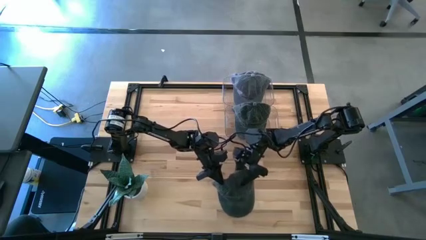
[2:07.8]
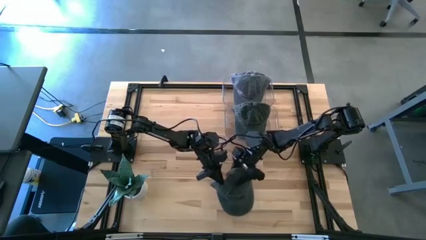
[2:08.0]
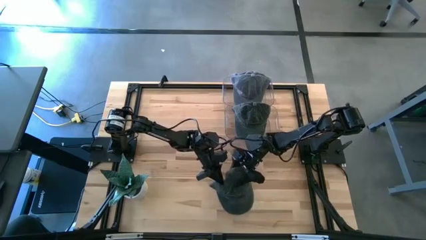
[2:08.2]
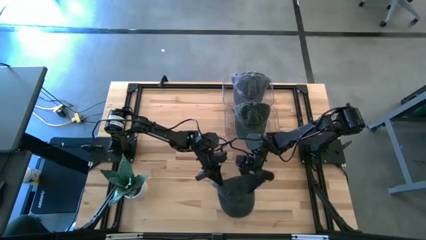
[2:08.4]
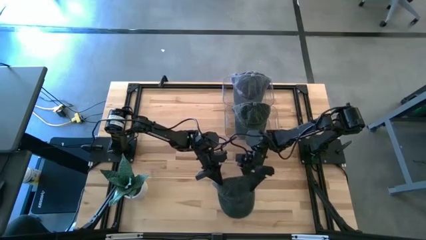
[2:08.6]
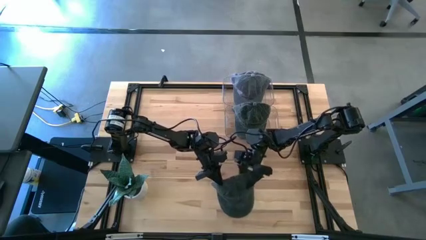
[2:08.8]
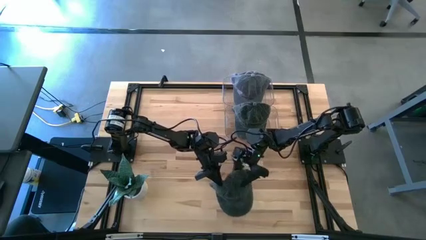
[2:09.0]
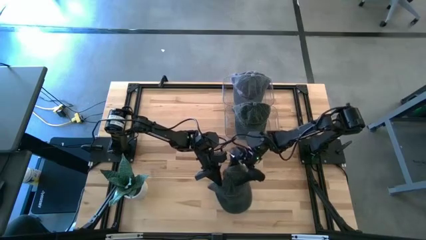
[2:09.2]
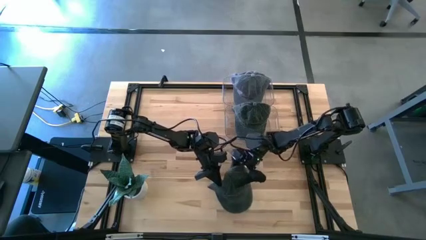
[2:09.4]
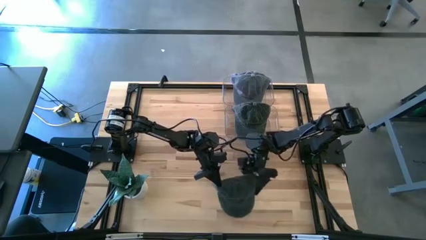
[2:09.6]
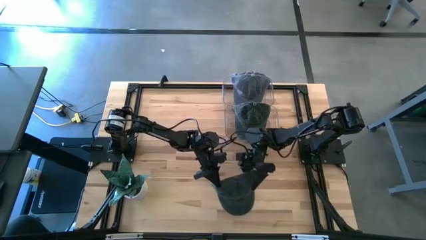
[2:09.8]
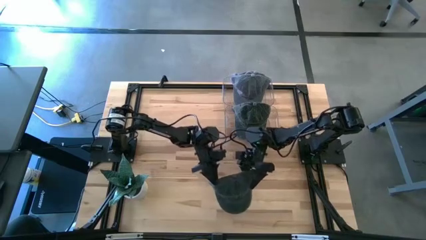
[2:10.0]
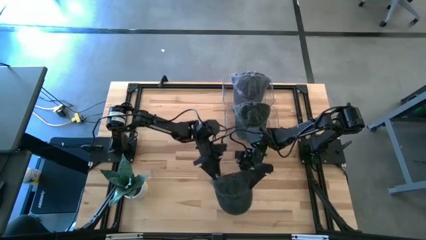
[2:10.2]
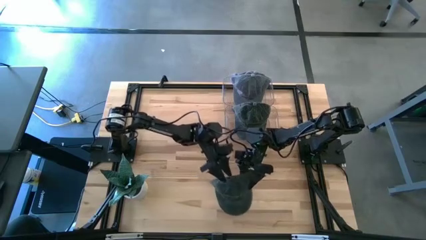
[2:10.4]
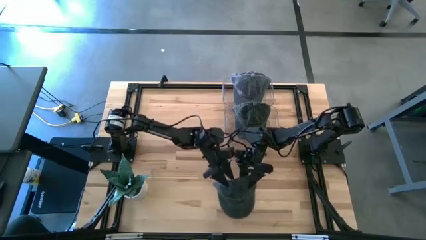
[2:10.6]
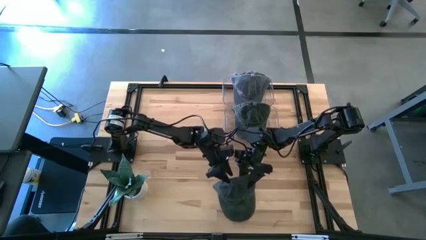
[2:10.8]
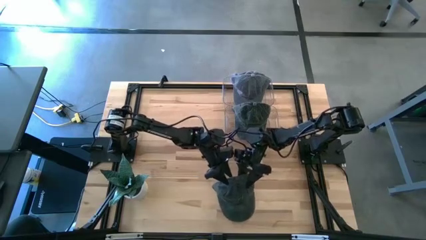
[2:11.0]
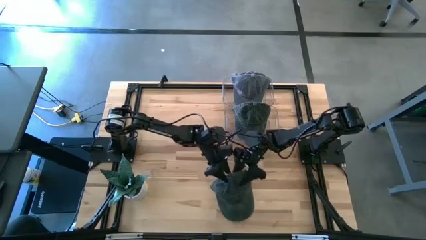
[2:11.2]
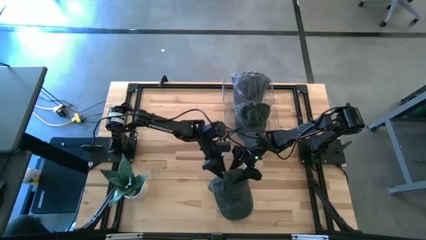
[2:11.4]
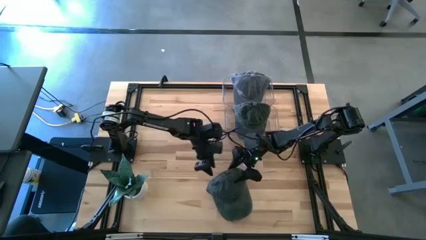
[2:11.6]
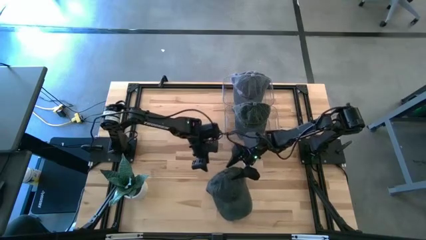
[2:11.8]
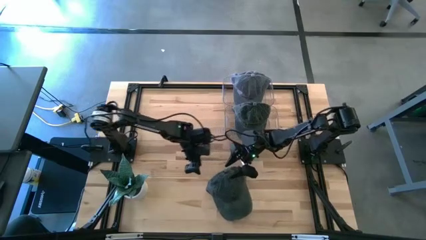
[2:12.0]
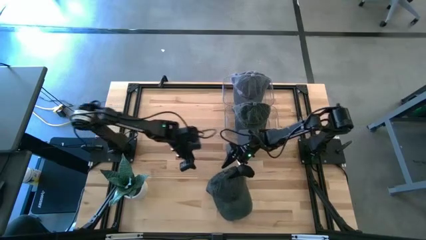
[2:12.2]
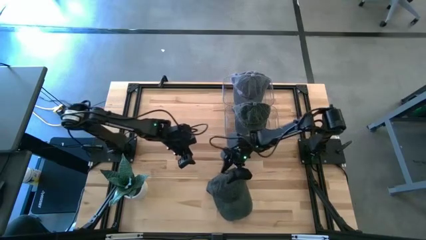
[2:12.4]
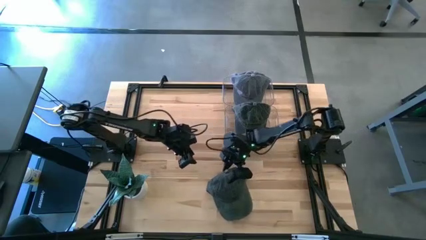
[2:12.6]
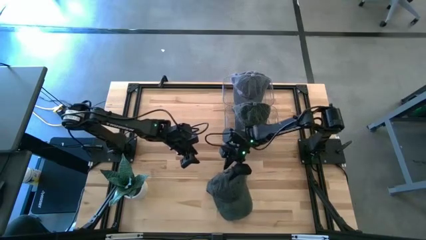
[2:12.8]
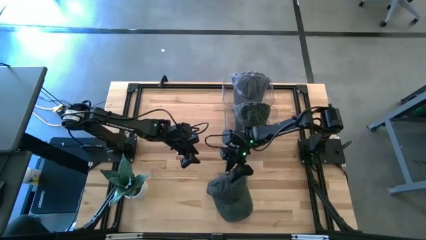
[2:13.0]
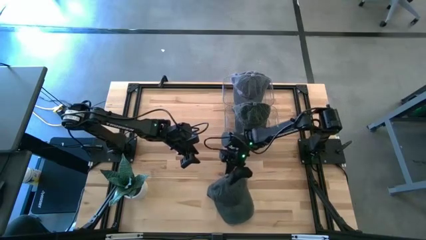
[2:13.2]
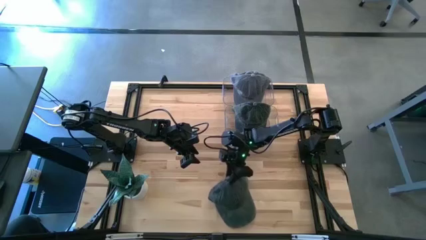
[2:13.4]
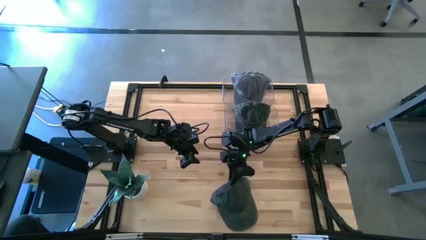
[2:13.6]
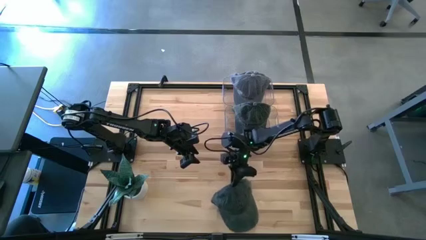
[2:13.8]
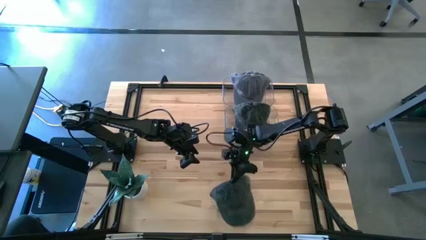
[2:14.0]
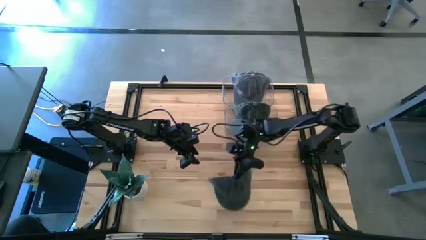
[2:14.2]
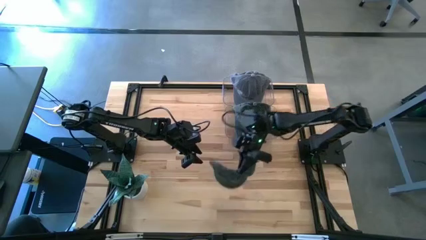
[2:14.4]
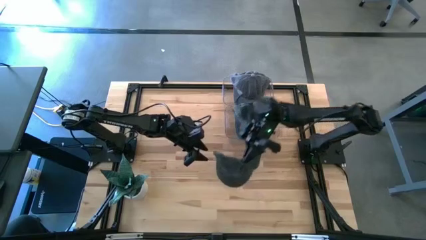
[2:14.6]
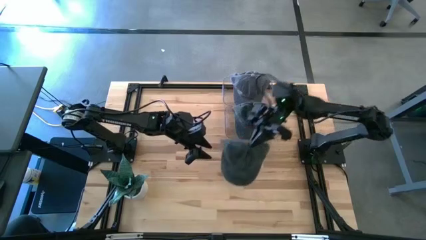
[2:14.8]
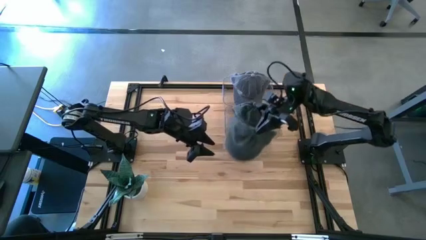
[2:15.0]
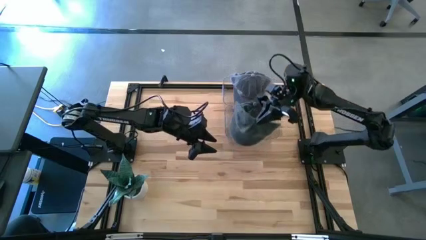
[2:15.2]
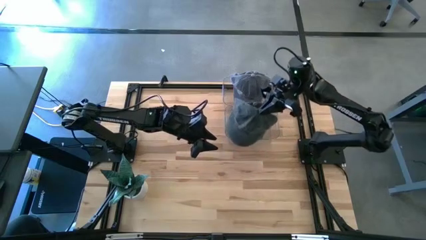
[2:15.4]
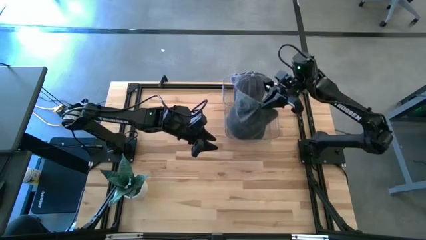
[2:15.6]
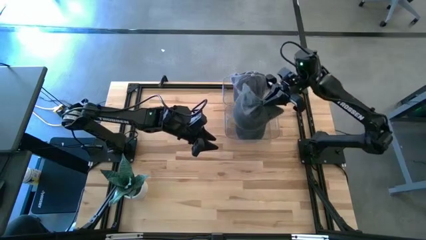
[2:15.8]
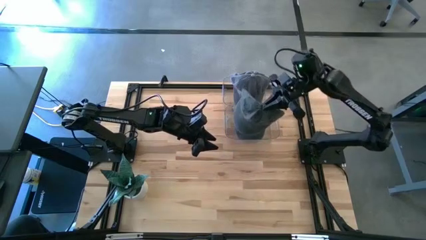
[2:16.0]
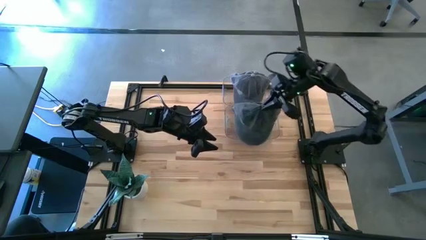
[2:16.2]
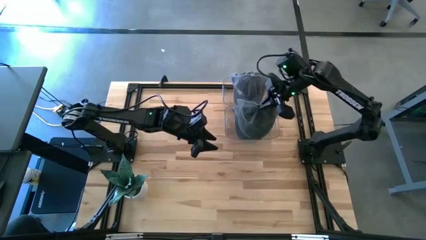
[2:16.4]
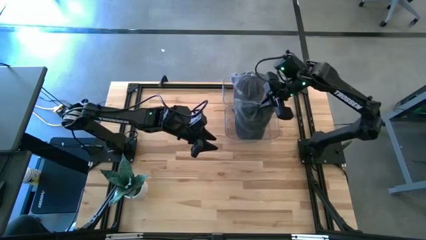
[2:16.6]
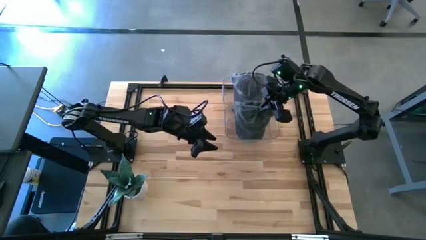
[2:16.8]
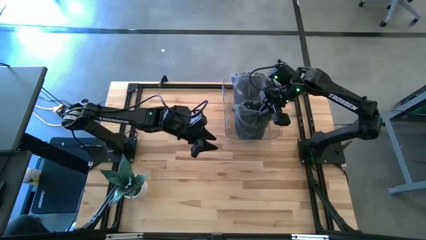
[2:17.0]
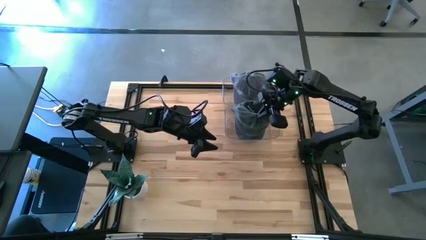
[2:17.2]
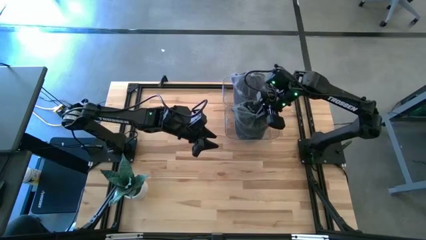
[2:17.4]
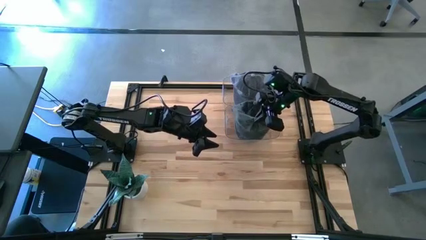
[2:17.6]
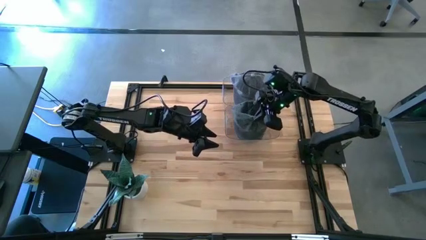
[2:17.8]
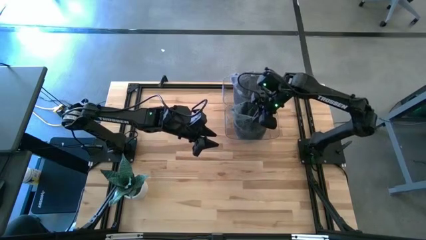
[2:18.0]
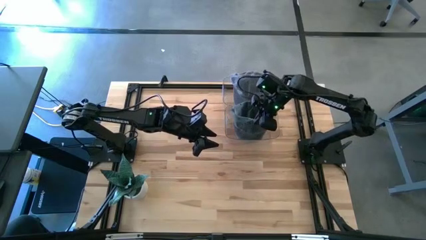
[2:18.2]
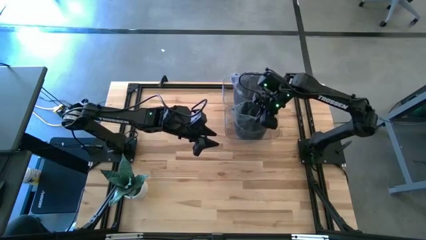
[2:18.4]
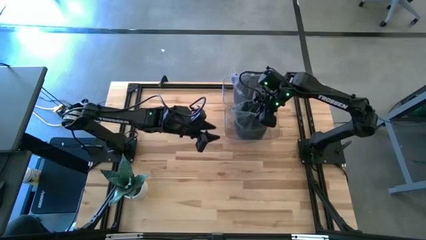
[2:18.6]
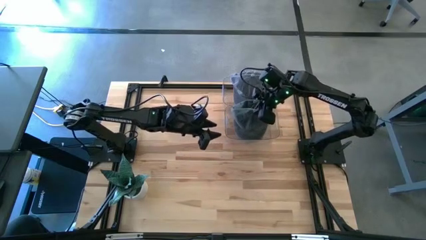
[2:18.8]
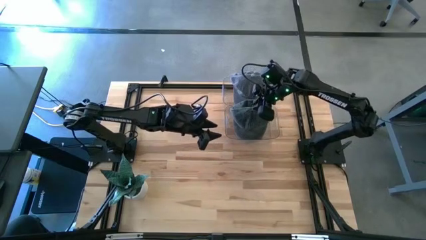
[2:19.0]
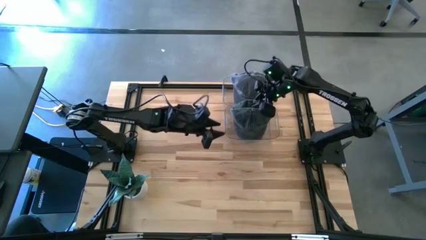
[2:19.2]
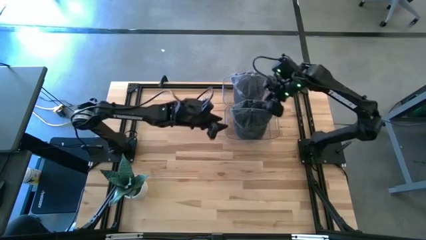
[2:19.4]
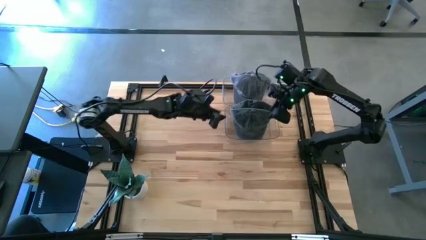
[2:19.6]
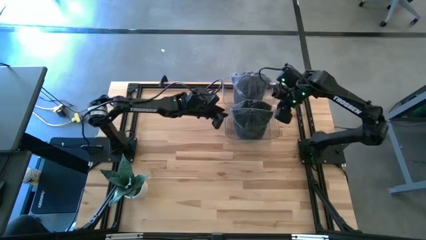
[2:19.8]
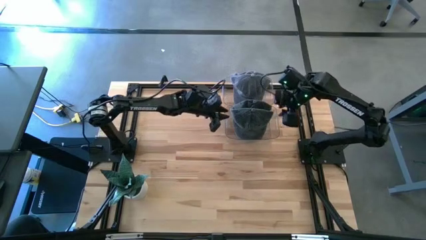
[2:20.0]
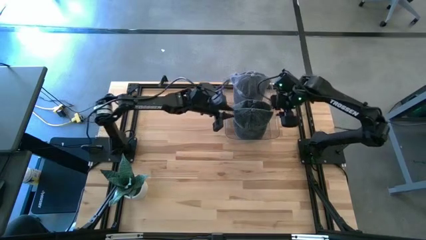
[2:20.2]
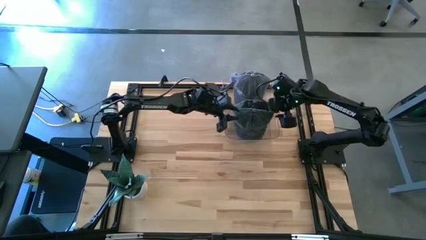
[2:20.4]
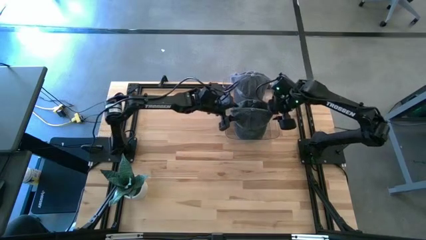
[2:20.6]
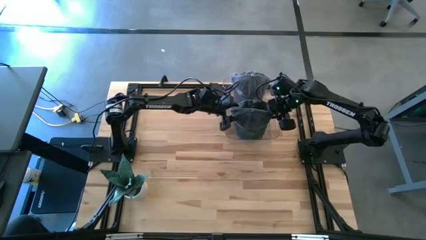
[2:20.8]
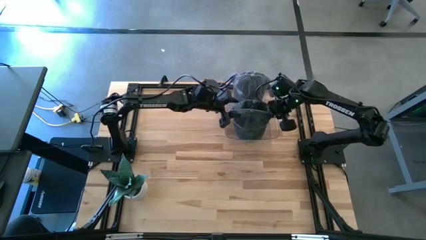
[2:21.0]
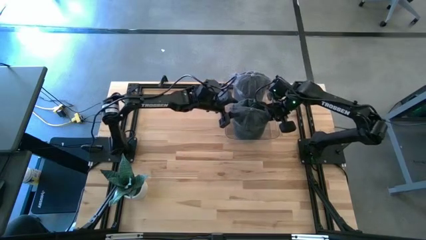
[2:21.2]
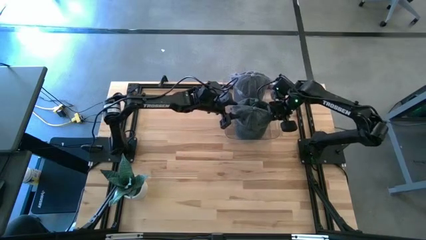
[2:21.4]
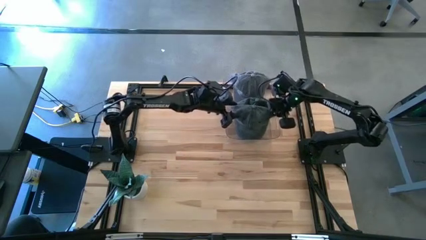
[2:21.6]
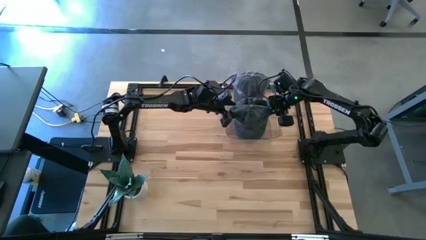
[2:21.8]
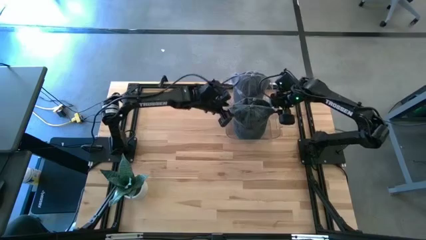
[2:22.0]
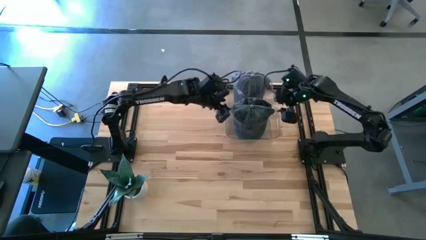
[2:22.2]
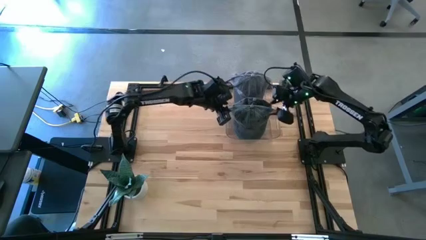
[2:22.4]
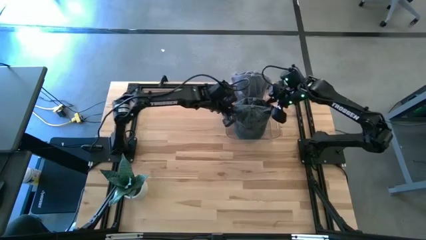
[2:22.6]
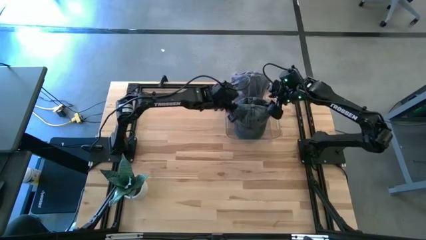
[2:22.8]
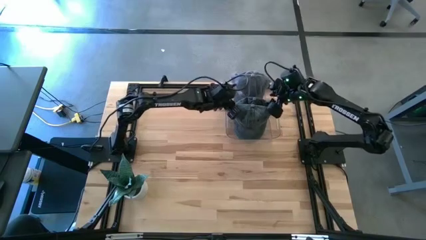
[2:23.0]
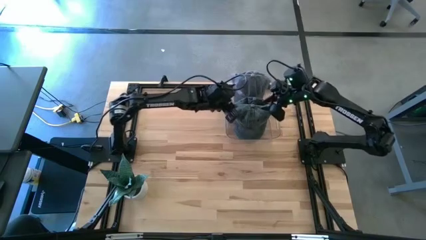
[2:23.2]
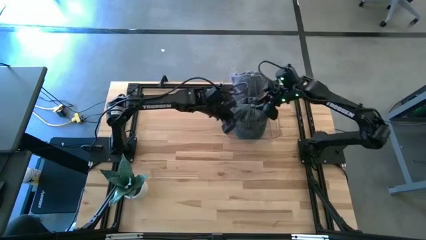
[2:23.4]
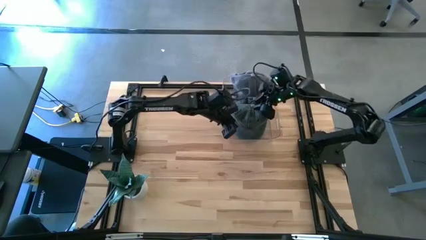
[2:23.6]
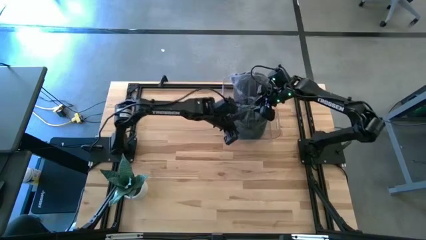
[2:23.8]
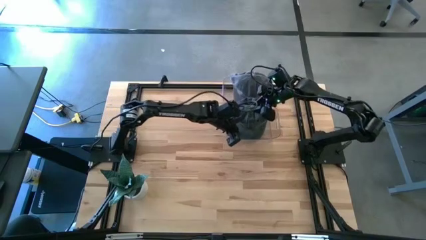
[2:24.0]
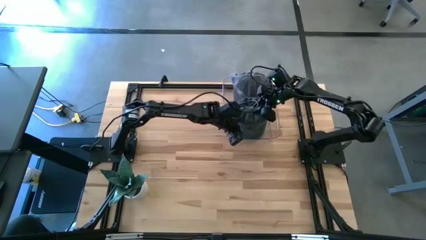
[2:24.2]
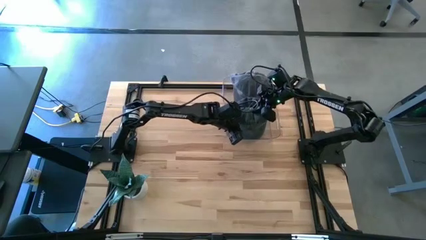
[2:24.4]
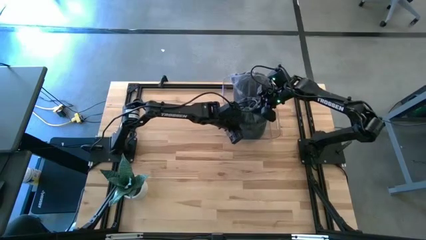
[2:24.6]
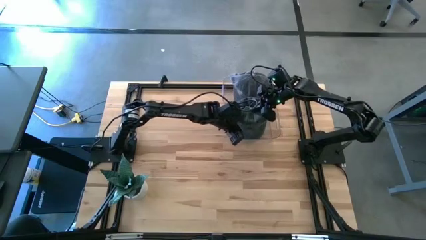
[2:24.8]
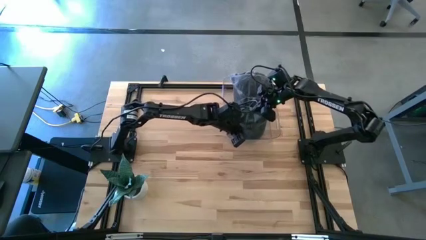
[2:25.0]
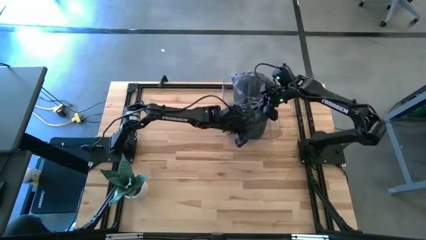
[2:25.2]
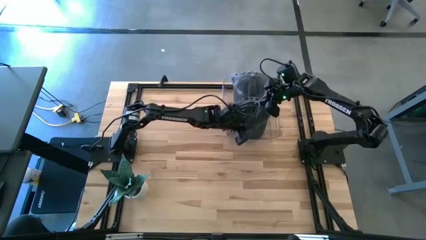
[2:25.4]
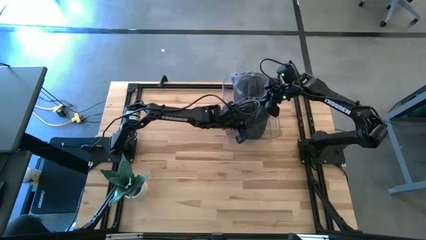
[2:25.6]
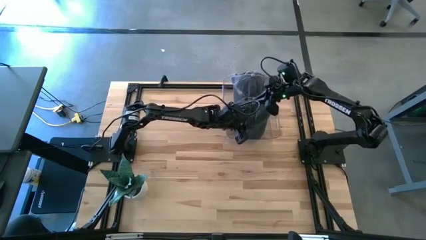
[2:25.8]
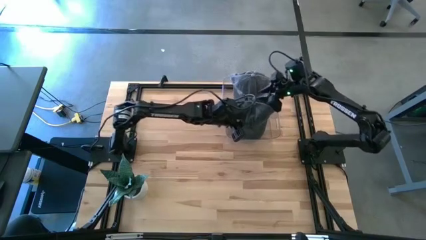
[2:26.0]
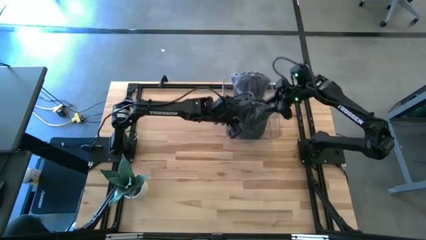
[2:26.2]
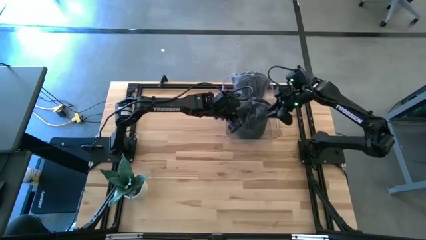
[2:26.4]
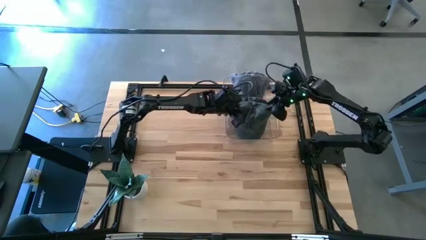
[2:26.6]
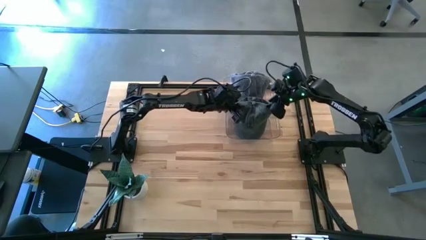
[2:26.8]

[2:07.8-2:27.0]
Task: Pick & Place hat
Put the black cap into the bottom transparent bin
